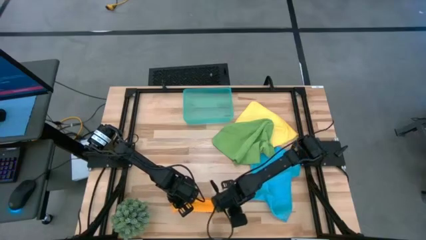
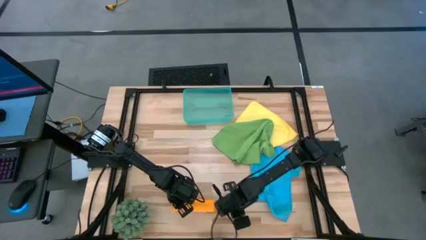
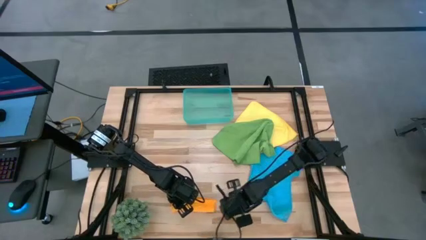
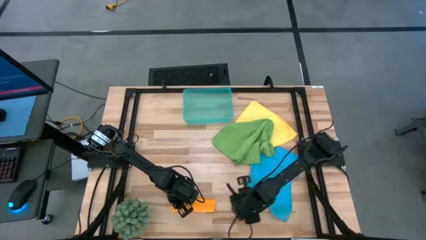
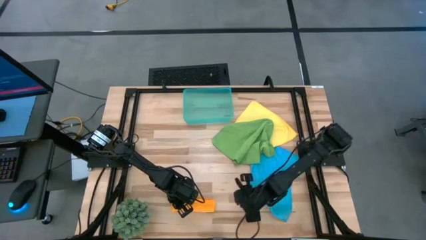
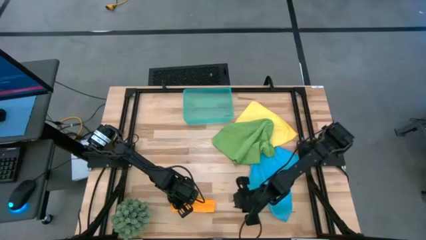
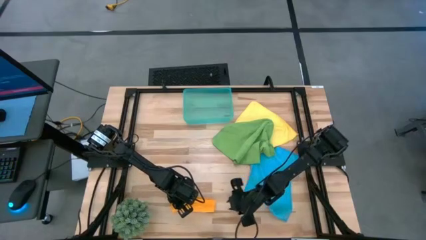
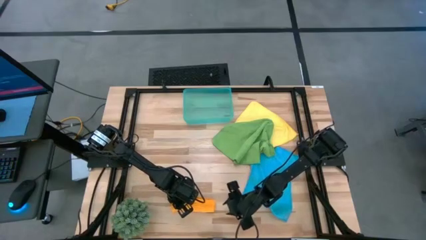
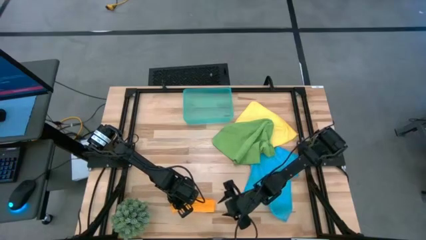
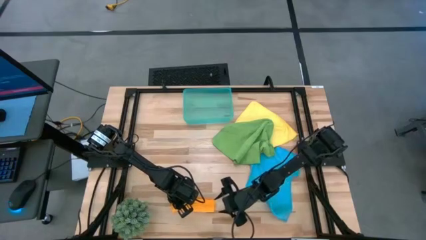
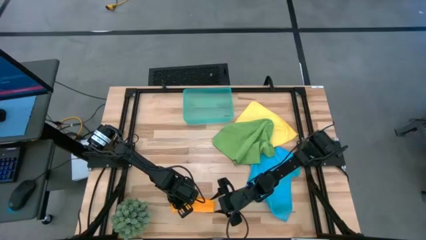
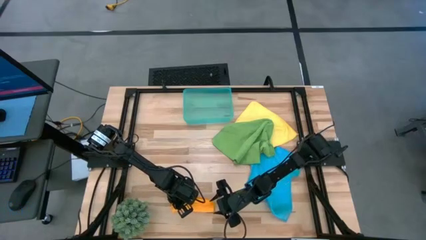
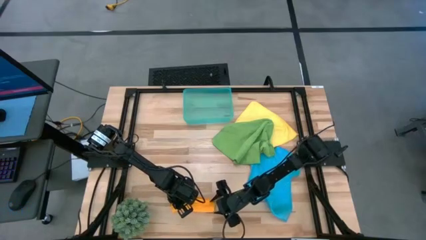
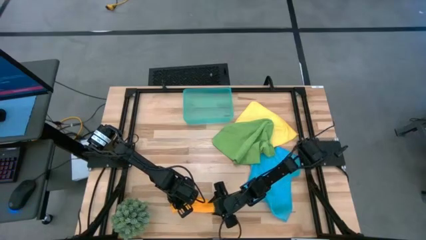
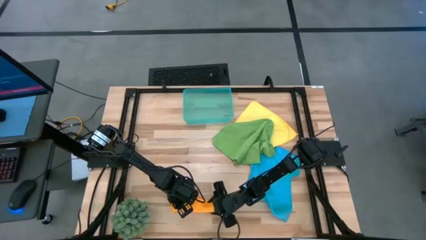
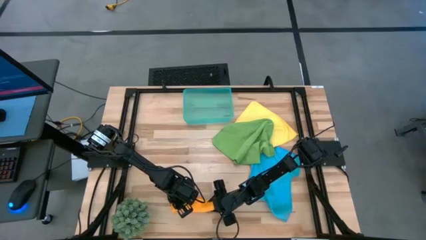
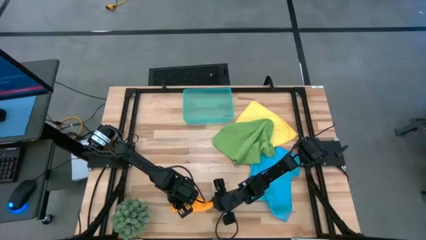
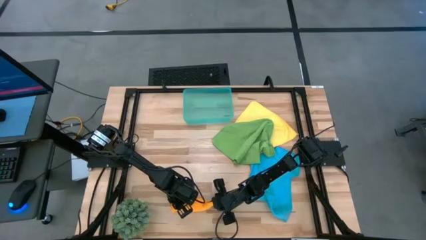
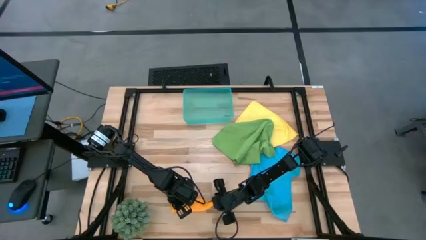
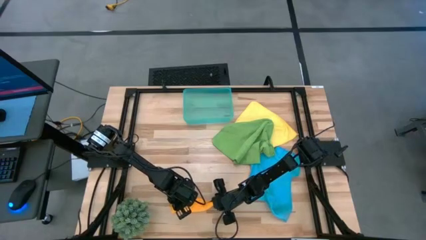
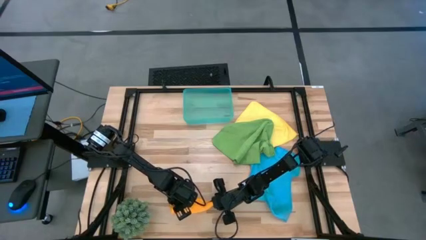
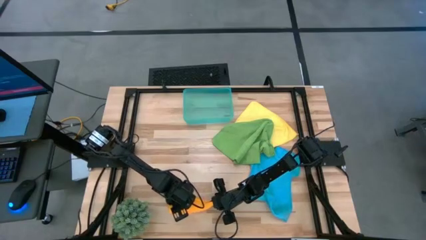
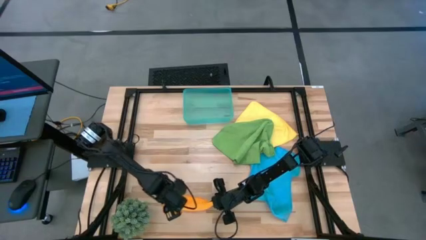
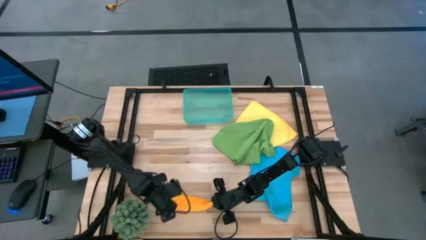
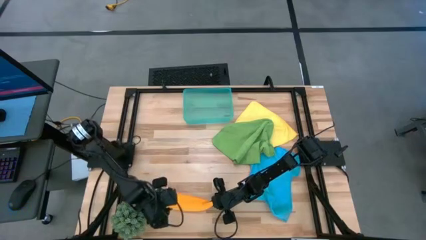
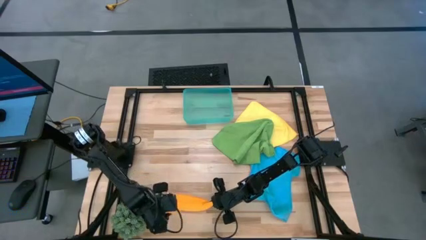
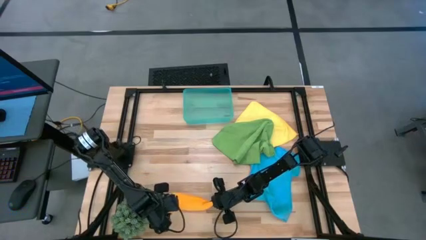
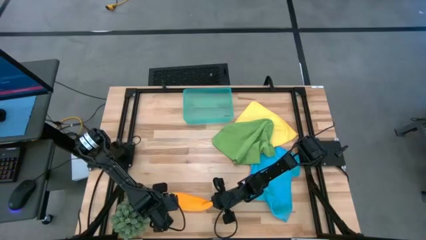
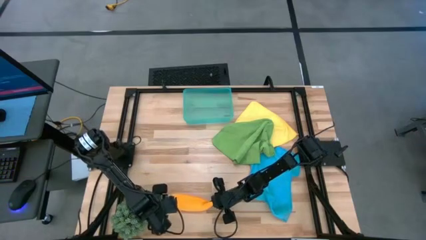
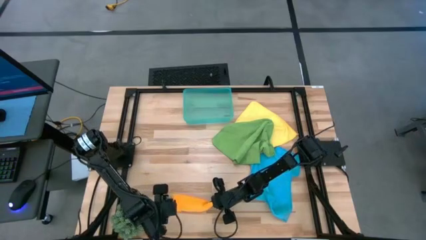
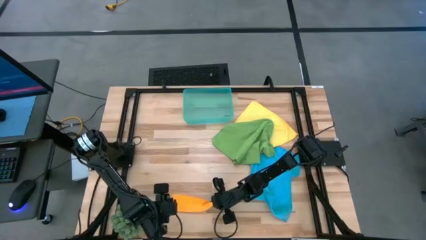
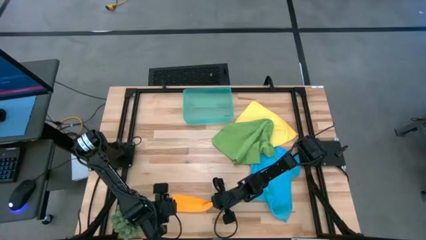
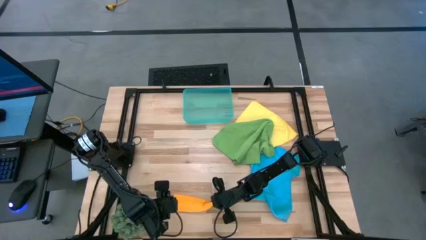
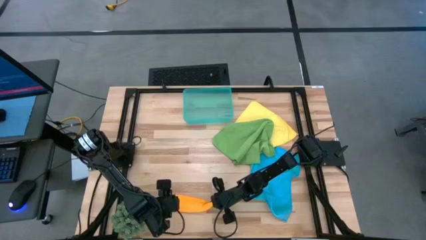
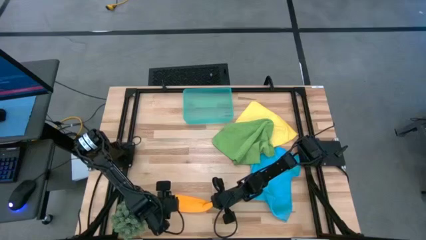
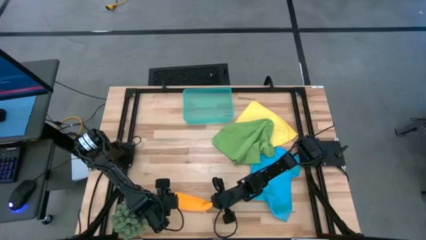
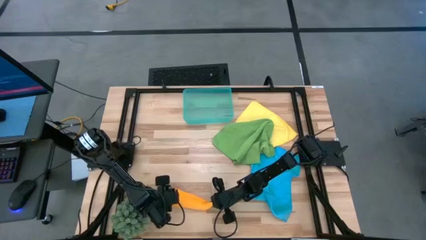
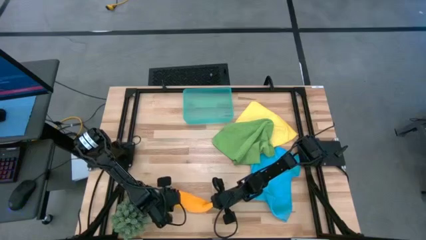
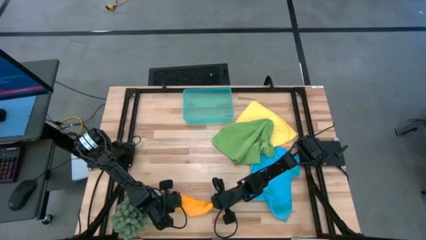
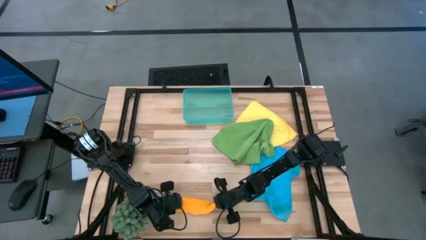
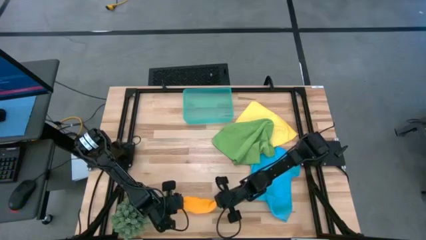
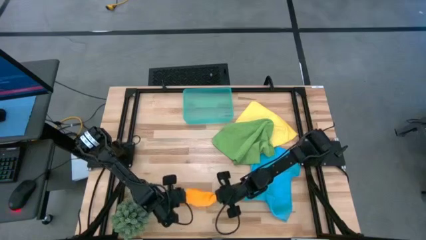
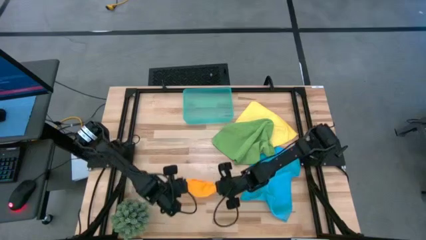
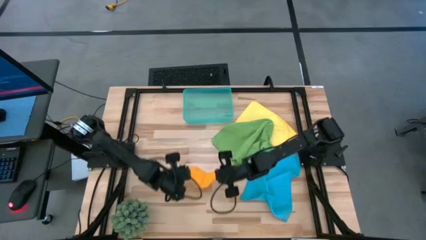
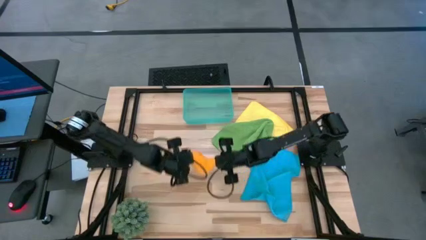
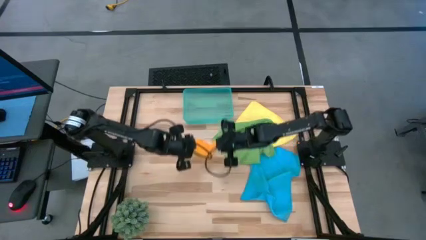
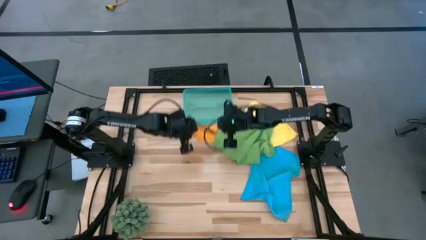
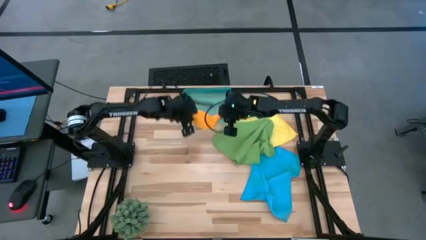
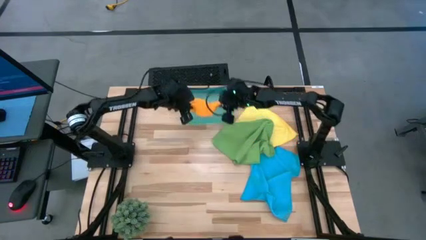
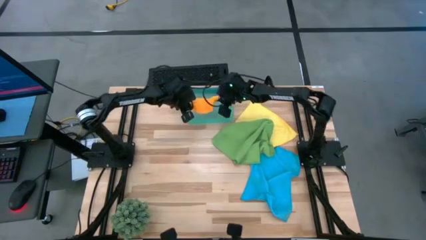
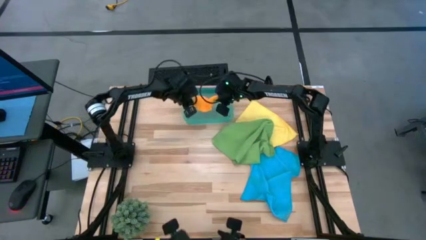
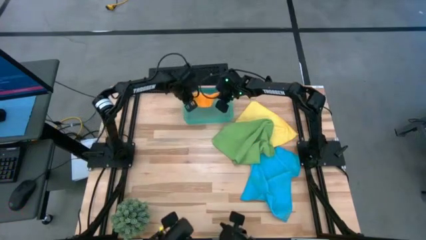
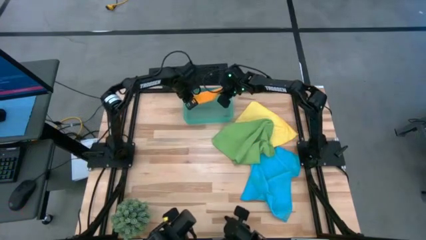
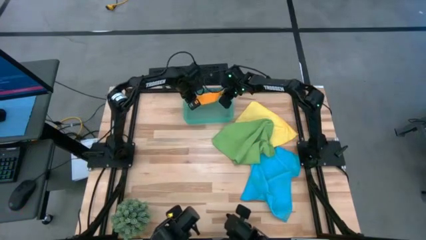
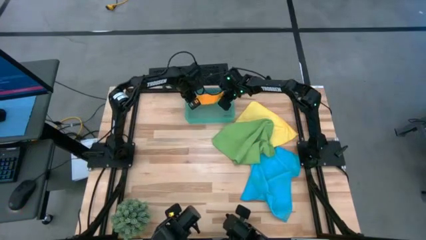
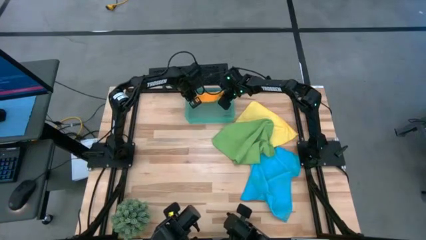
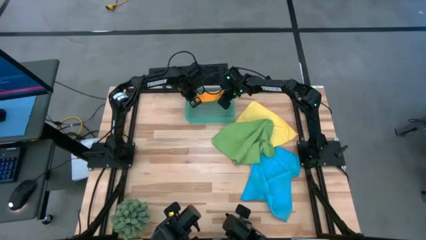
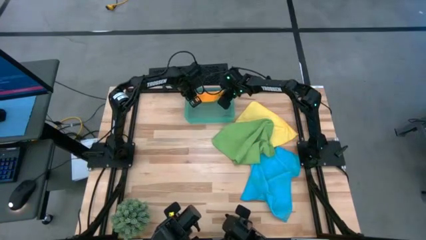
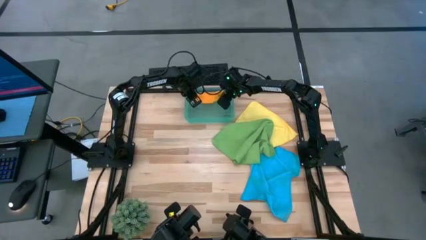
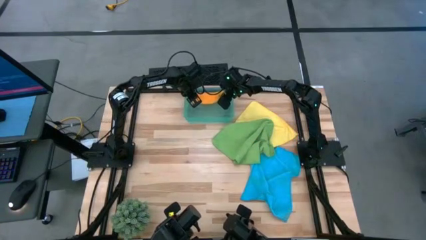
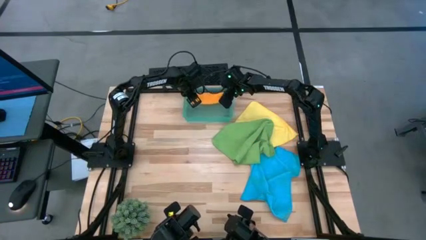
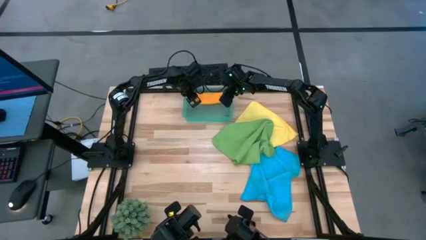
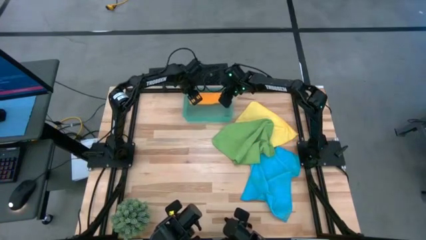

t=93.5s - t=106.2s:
Task: Roll microfiber towels into tight, uniform cylinder then place into a basket
Put the orange towel into the bin
